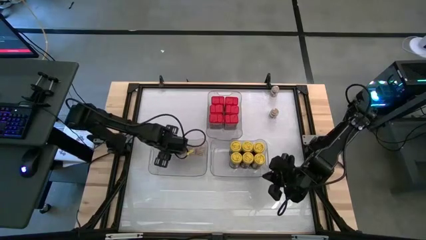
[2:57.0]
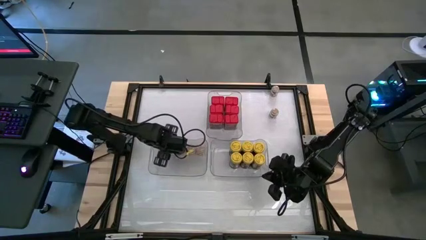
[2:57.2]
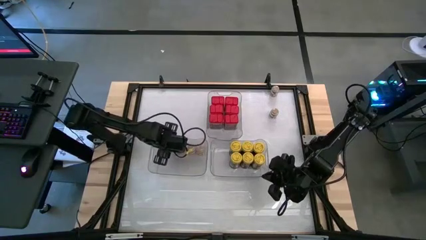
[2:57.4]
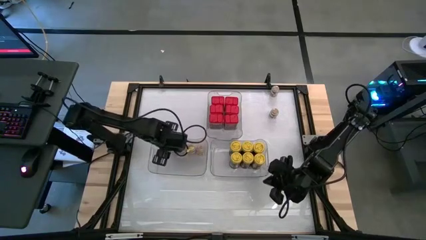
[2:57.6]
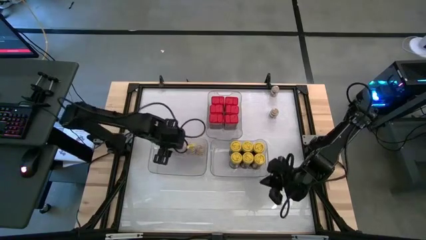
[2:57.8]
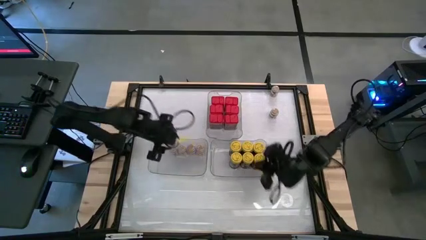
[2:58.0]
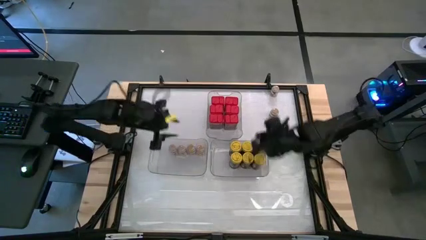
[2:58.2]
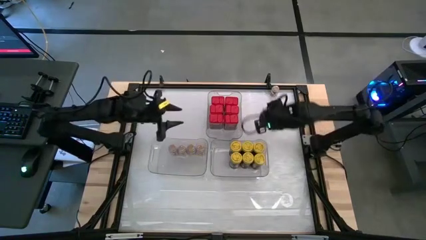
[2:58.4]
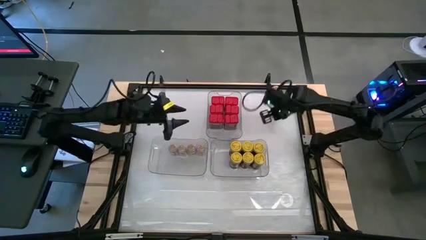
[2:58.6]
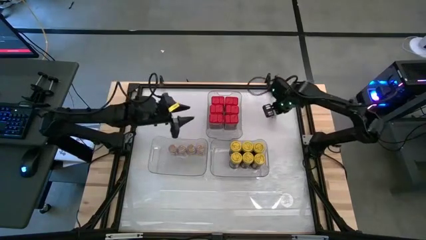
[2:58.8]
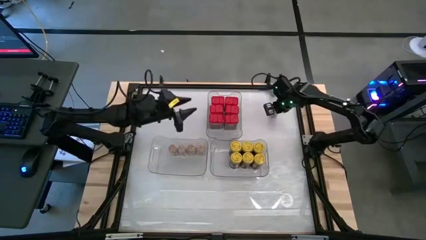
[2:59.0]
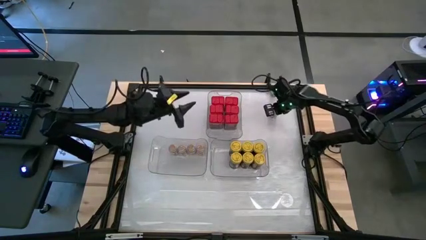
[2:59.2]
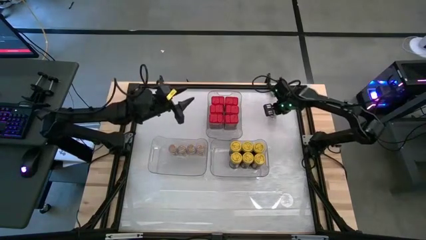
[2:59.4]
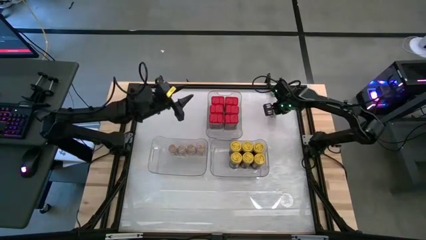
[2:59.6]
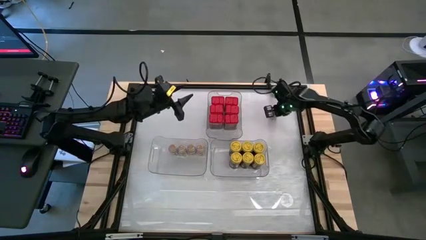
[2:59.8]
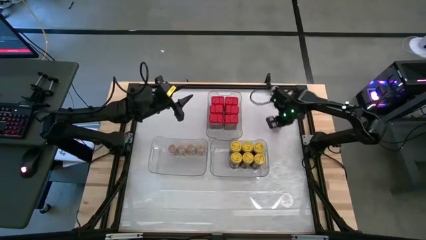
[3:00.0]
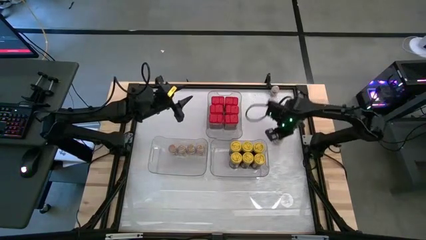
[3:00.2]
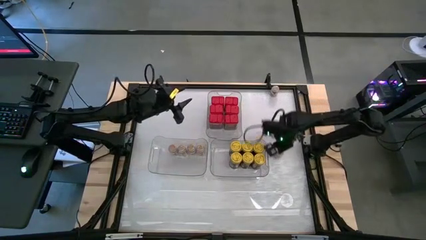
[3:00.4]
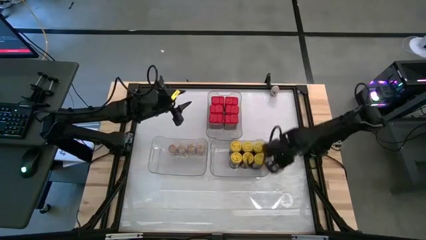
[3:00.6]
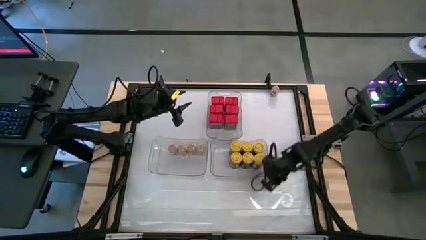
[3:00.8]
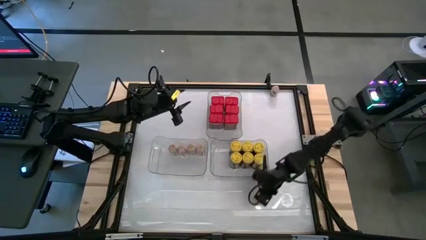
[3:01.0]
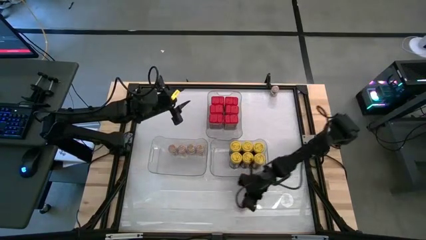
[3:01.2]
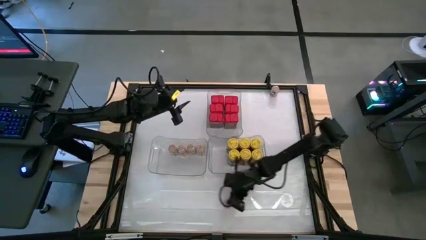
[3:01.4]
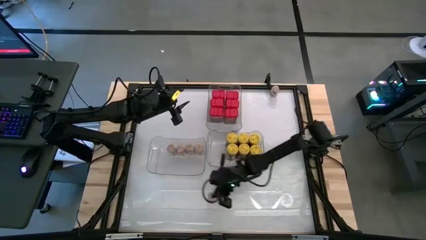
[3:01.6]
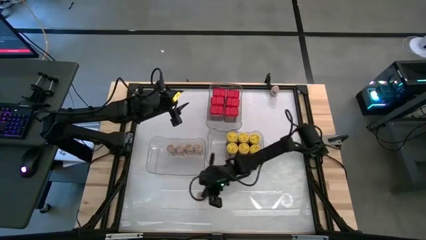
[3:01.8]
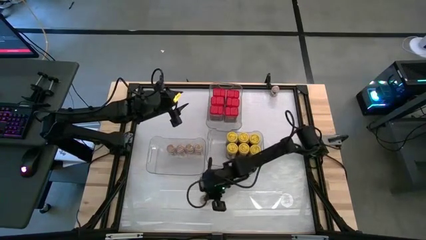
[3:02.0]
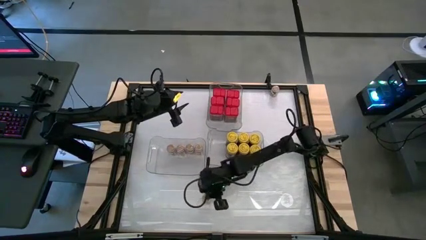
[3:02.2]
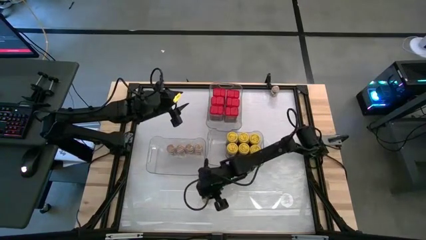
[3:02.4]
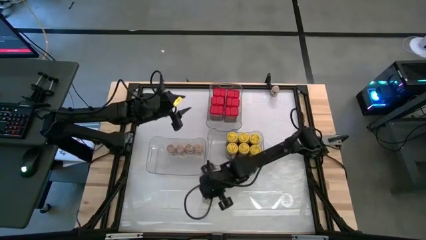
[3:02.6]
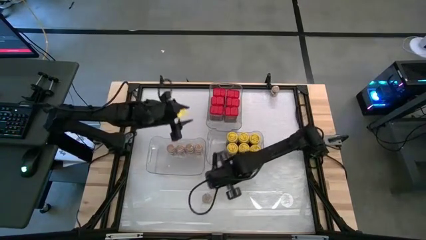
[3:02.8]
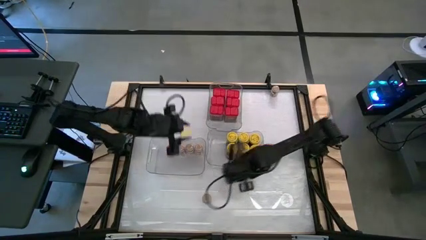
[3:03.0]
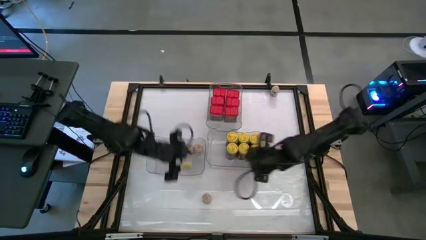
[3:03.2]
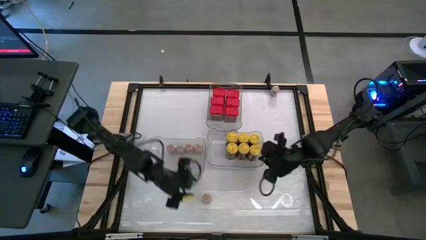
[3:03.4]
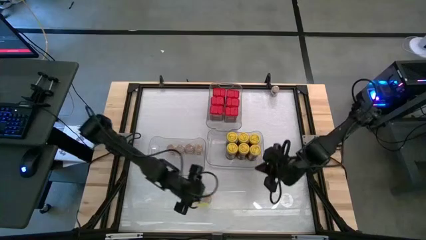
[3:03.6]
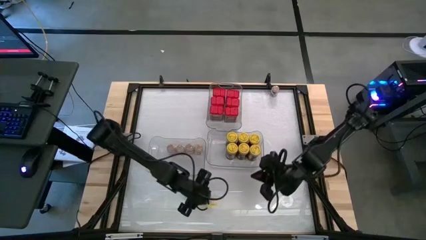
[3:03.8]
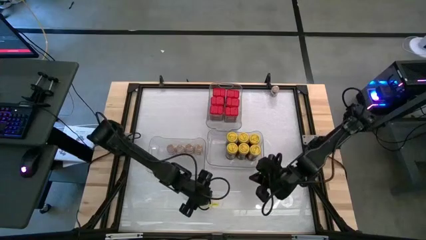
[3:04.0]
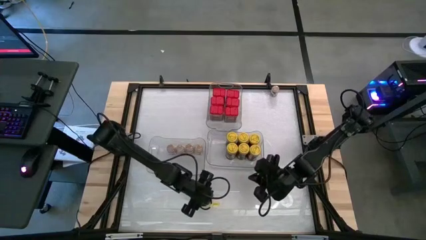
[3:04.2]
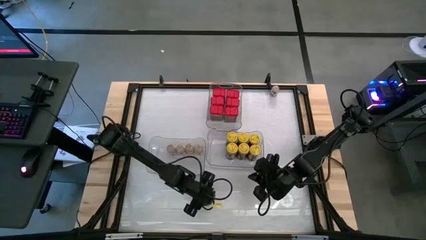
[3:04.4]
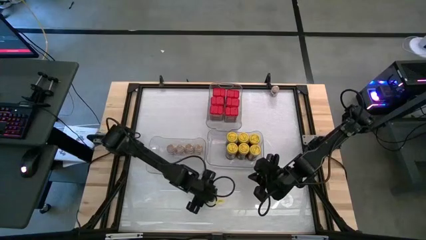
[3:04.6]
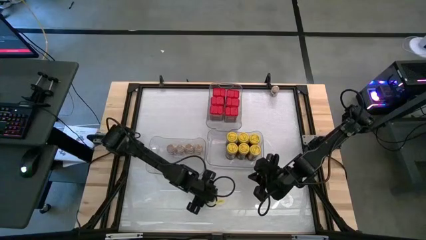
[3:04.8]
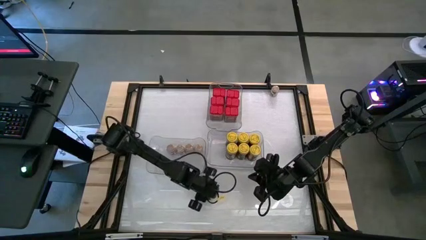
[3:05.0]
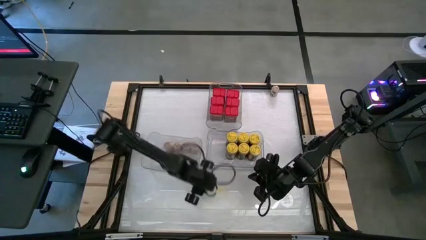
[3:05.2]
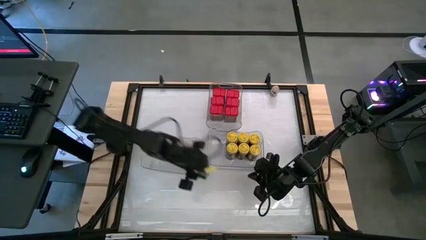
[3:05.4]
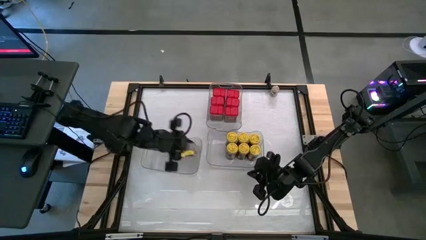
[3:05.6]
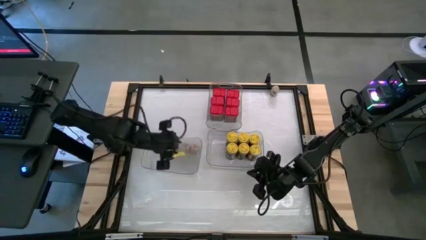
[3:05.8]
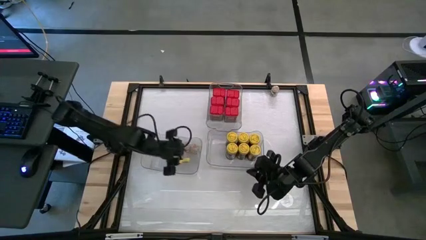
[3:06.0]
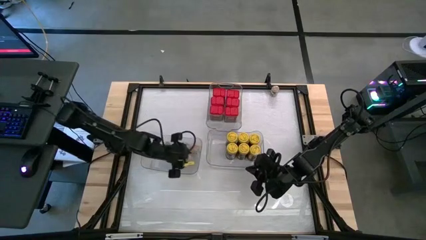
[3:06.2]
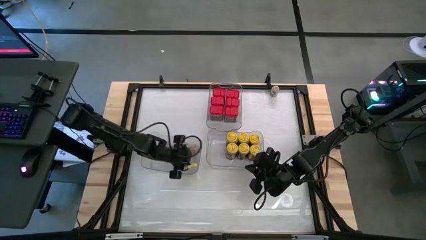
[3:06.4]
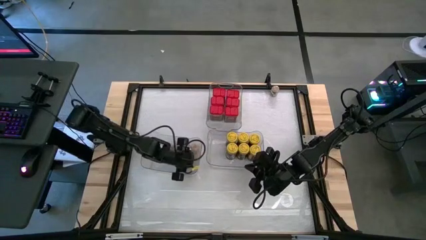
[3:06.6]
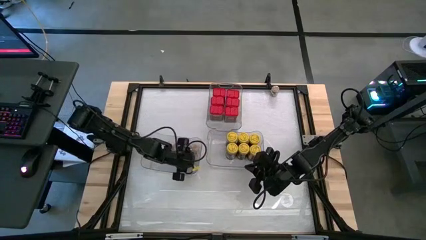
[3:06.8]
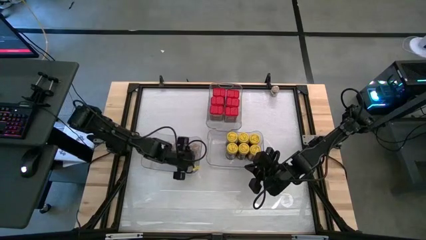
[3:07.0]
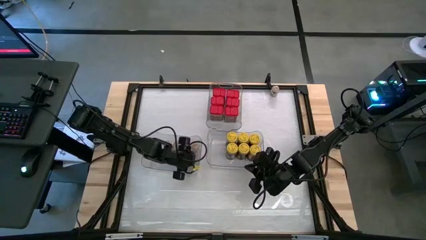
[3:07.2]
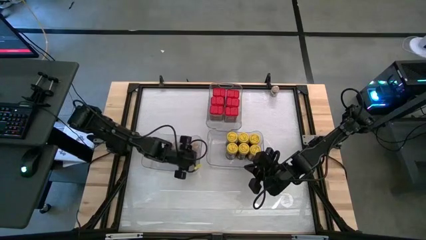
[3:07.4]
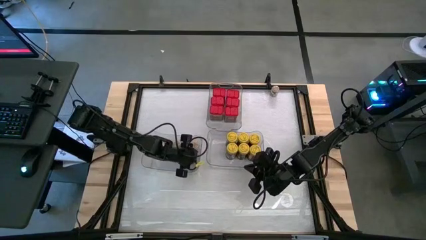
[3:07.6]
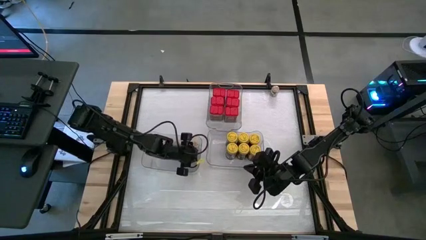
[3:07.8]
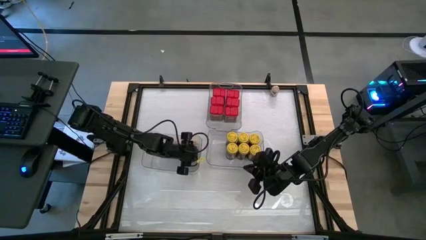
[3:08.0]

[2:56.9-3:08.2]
Task: Sort spices by type
Put the brown seasoning bottle into the bottom left transparent bin

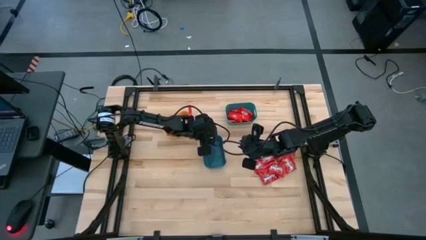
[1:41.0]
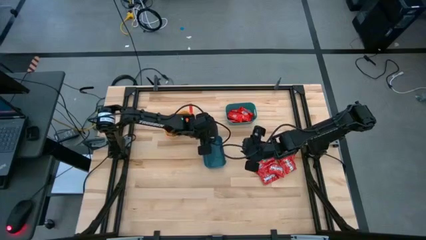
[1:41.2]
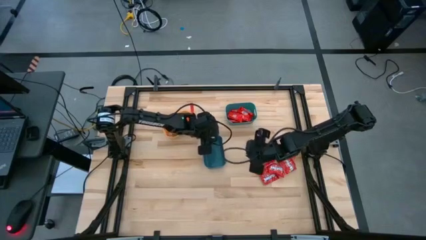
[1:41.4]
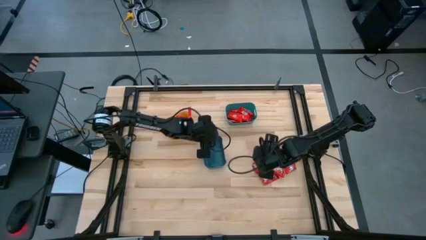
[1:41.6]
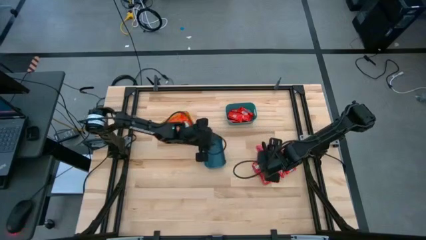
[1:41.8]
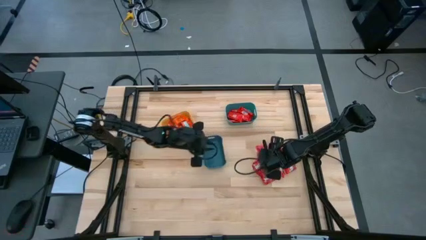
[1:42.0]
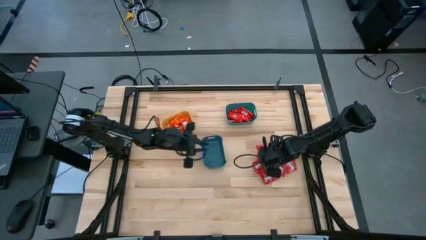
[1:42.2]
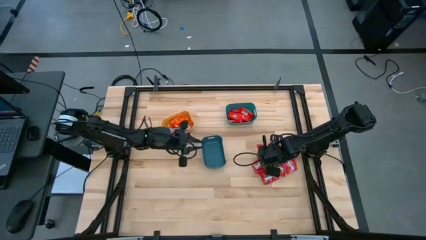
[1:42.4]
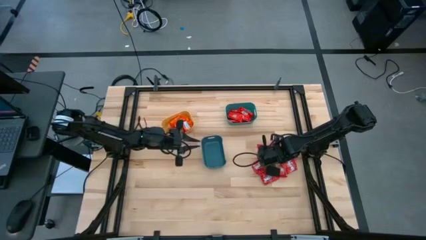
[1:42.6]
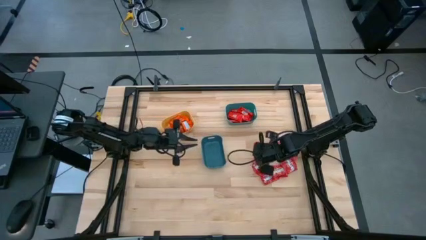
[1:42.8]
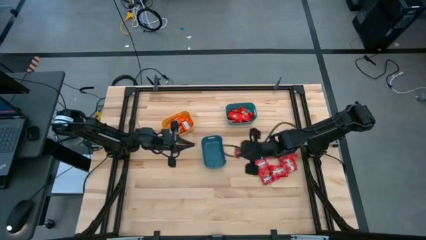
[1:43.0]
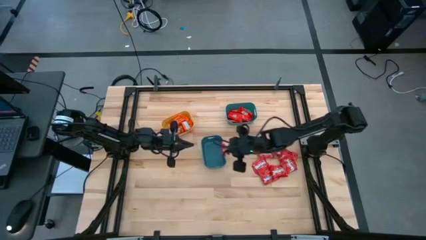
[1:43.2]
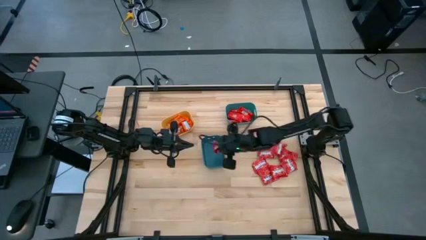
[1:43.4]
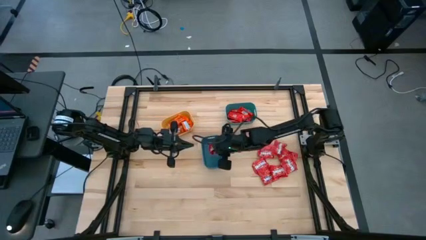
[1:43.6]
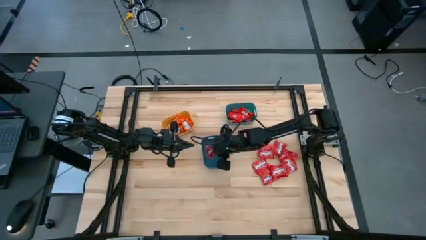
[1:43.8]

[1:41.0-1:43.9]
Task: Sort candy
Put the red candy into the blue bin

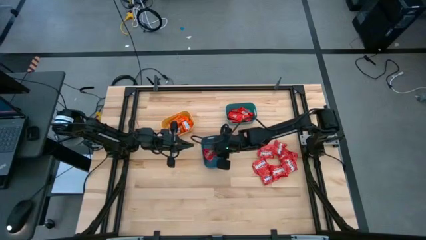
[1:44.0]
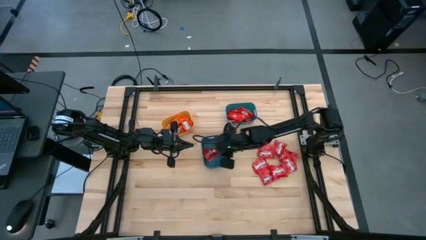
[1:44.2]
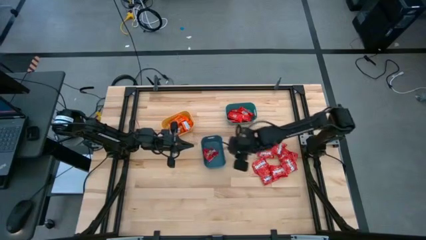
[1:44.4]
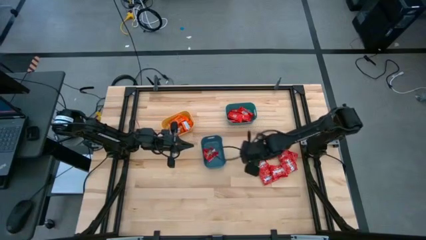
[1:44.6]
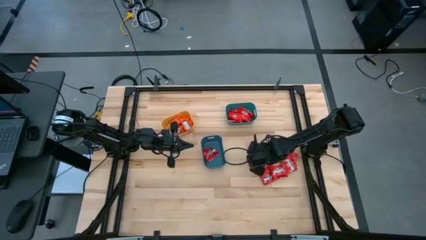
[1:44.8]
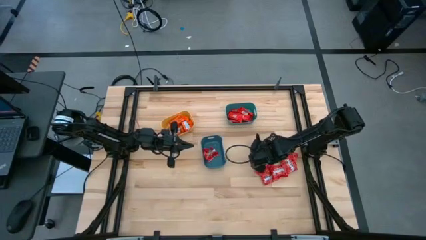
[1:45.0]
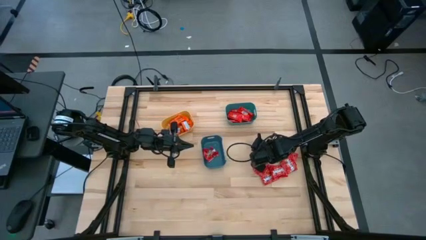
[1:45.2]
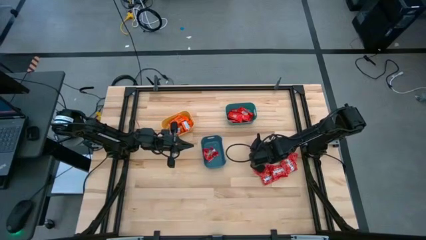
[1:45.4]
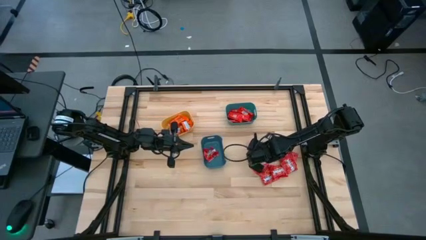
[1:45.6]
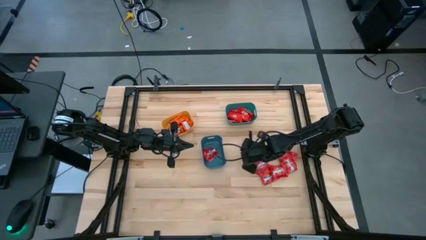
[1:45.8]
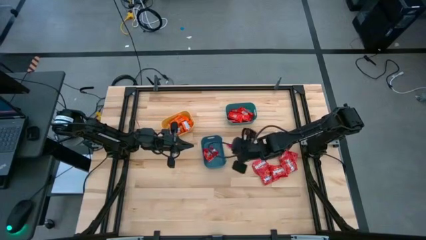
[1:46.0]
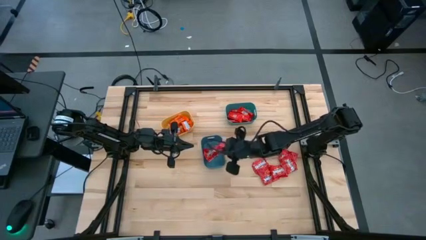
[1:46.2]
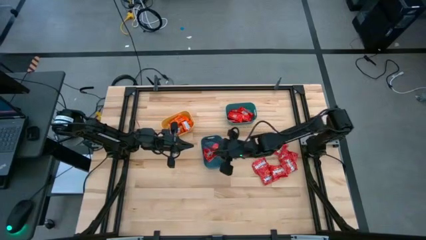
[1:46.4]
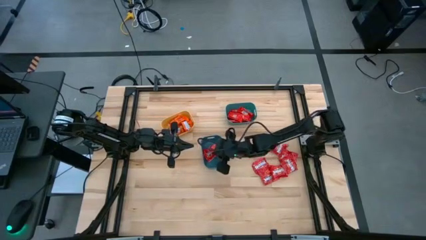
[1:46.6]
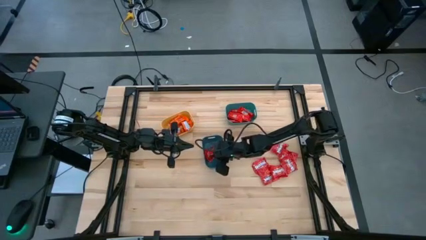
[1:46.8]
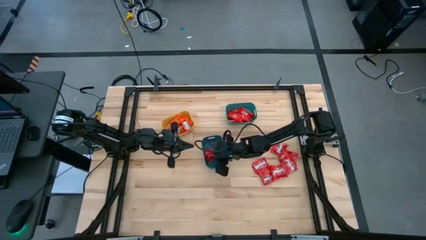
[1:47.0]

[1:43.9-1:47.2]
Put the red candy into the blue bin
